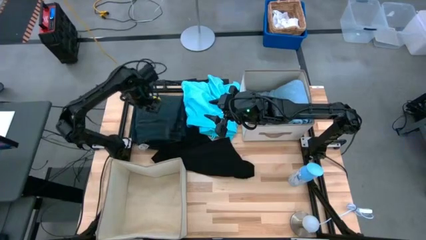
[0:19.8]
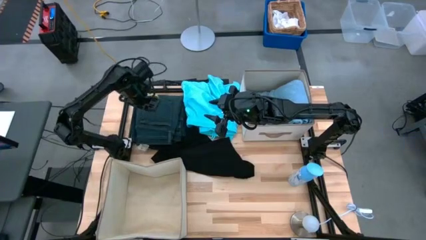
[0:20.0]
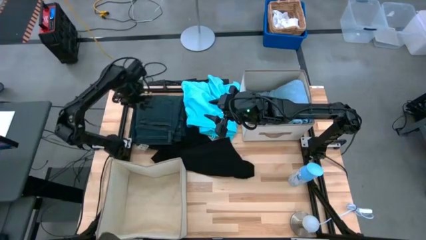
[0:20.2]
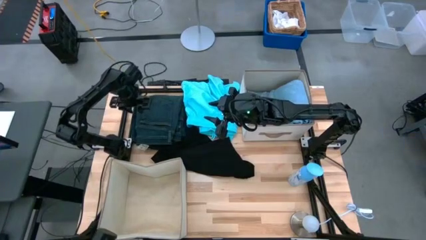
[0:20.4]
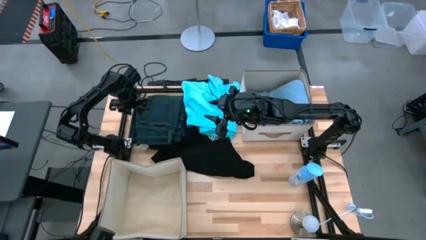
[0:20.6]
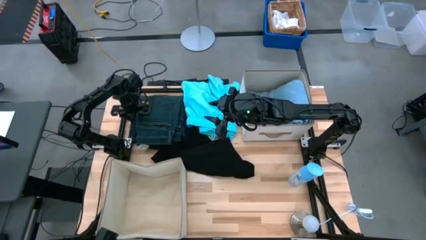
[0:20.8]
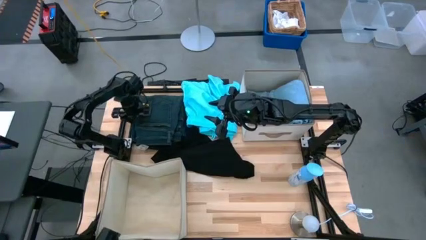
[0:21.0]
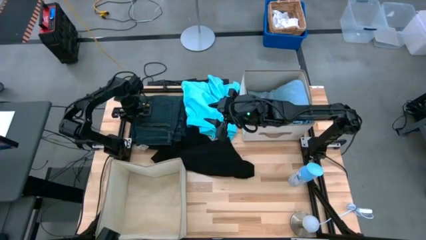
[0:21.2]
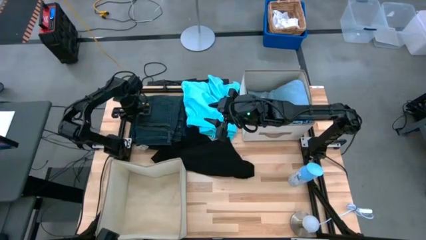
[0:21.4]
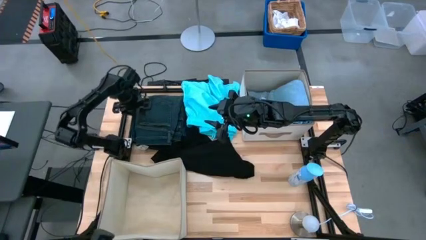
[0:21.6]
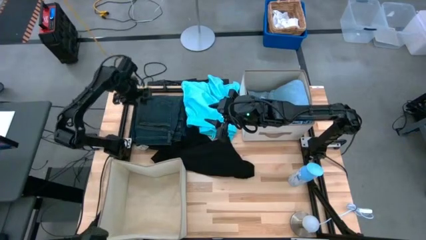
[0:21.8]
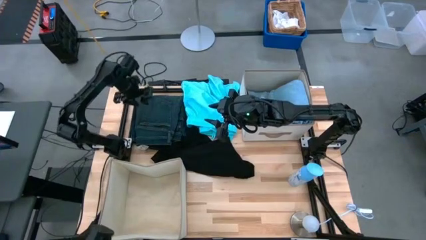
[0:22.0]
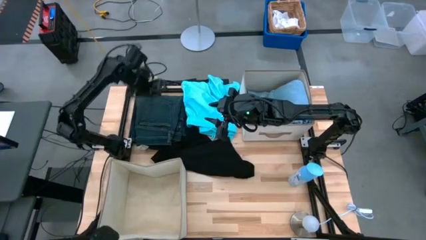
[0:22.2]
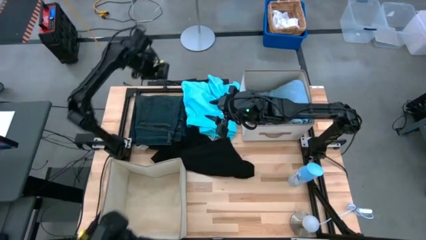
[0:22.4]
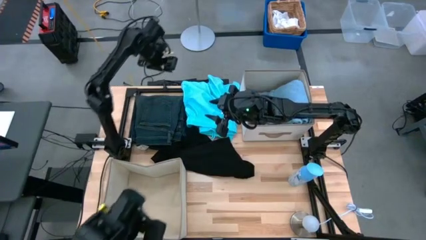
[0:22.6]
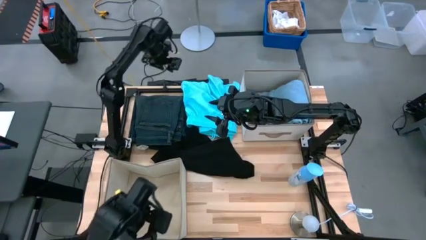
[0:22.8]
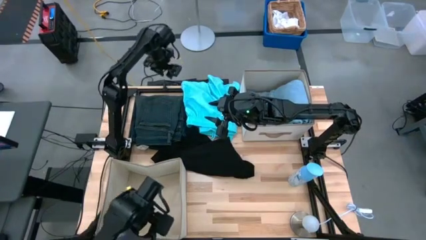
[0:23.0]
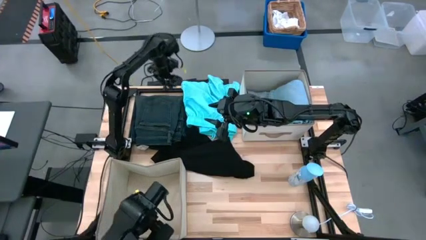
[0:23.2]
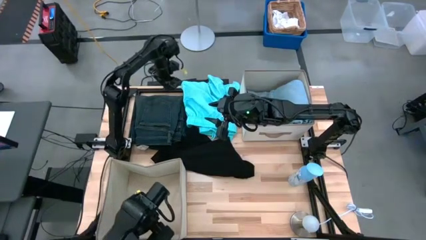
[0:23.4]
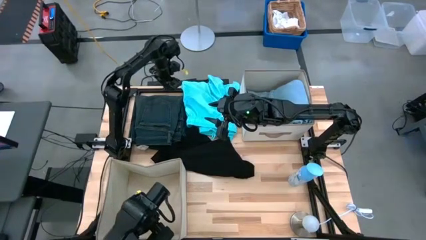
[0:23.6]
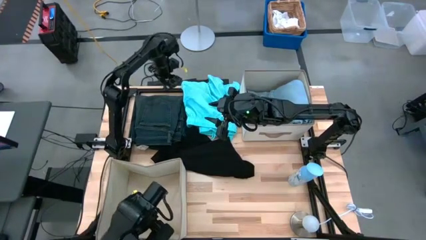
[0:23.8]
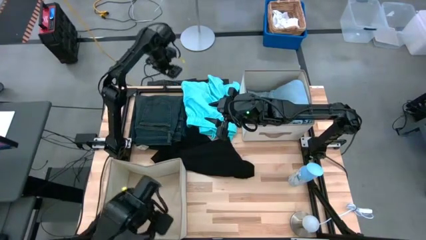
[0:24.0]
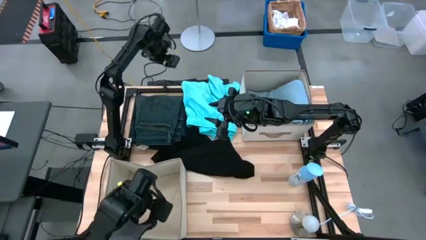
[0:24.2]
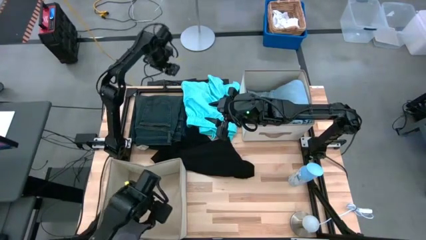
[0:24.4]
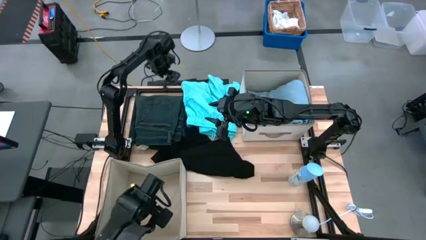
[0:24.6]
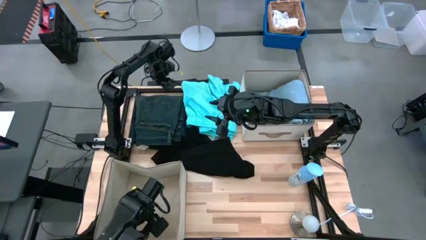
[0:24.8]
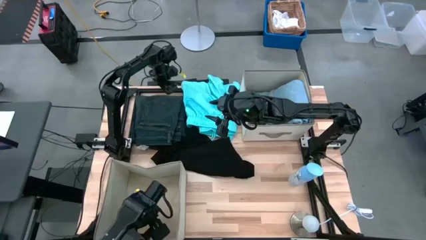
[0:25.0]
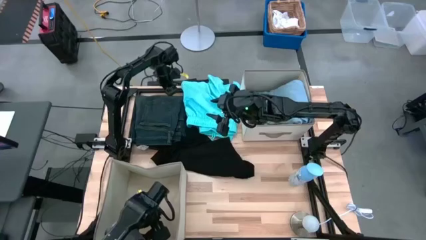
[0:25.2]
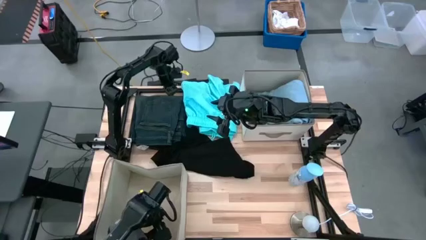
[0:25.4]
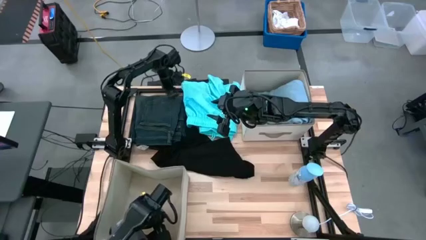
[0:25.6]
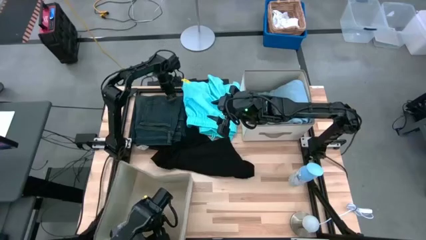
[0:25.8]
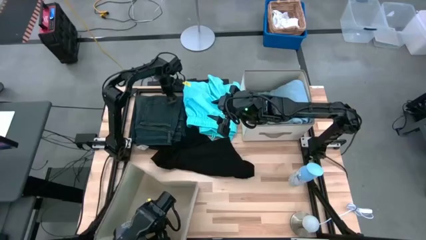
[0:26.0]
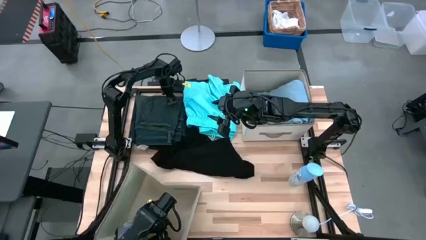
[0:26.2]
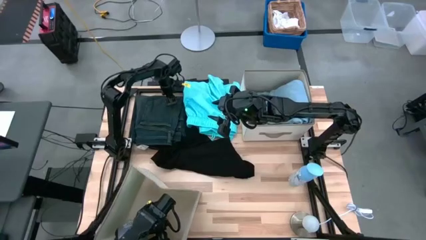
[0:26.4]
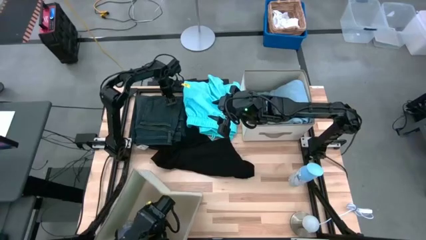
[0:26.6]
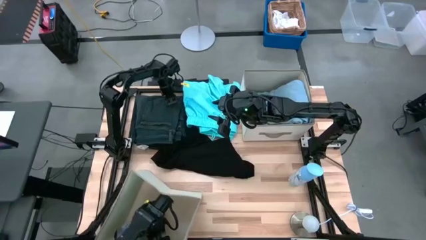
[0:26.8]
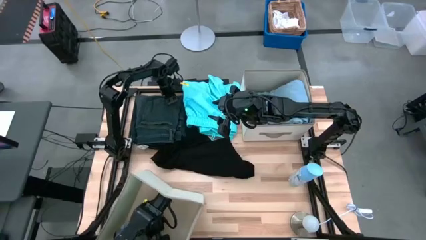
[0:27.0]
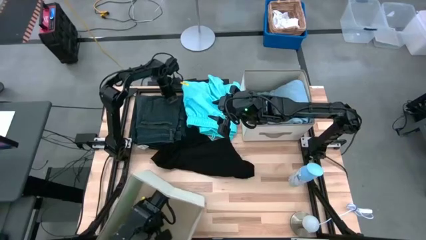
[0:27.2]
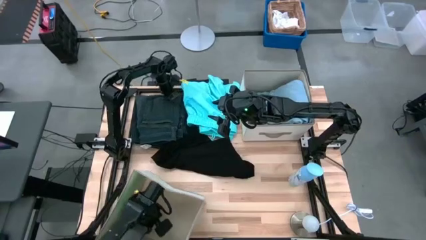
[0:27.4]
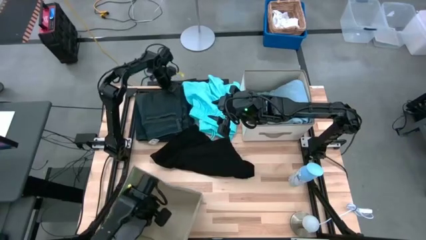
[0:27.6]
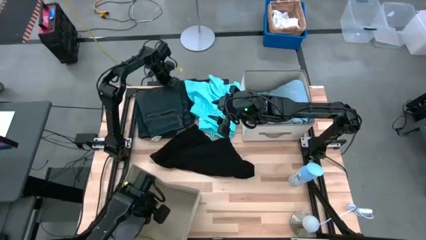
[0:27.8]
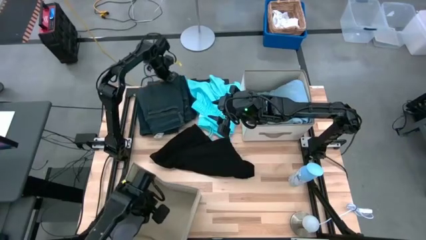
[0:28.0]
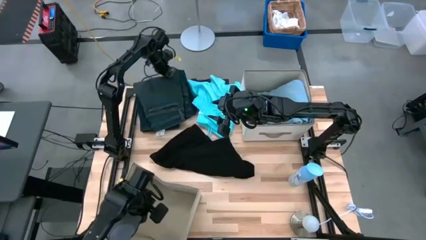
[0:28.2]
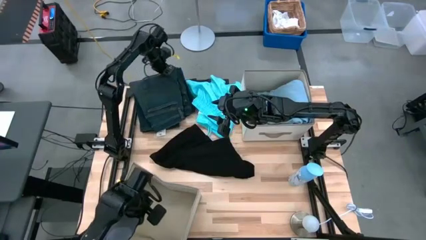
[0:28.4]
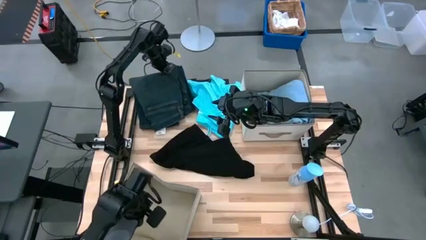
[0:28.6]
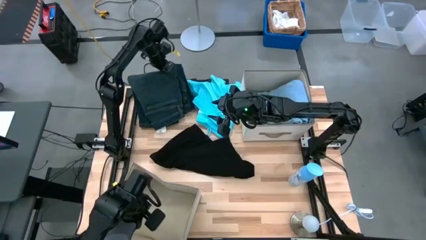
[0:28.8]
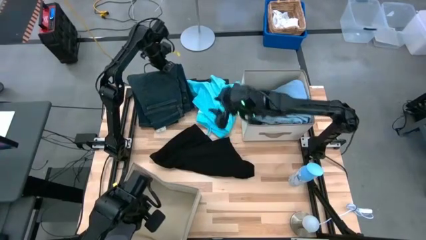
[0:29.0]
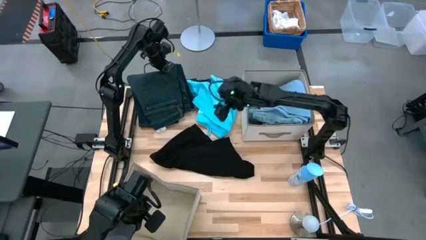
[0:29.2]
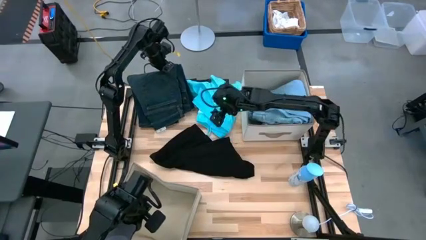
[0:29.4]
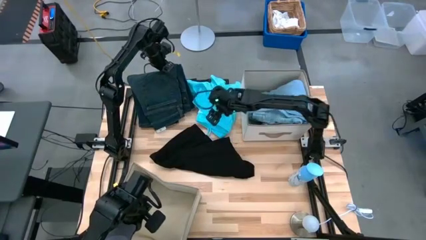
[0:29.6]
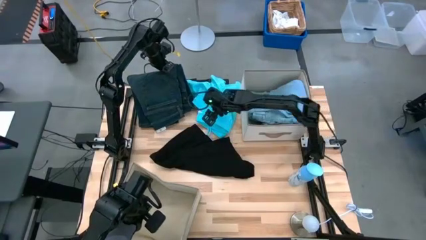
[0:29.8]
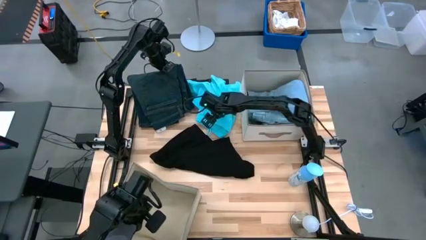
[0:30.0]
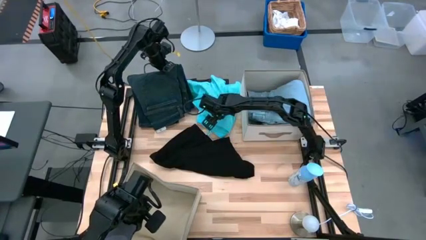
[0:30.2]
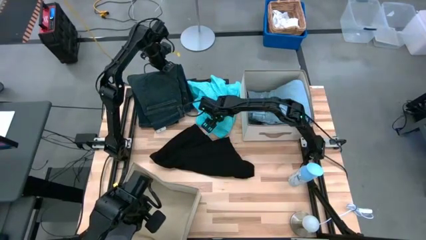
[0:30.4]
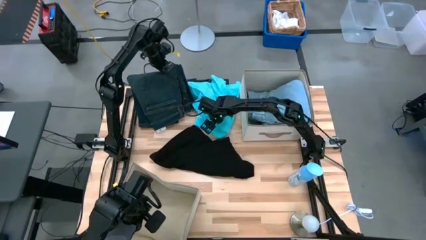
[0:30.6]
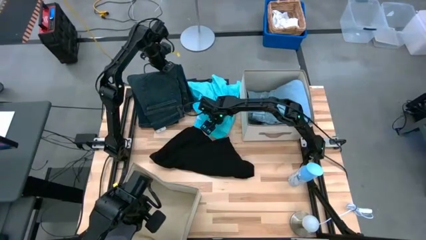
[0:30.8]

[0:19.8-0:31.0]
Task: Sort clothes
Put the dark blue pants into the bottom laundry bin
